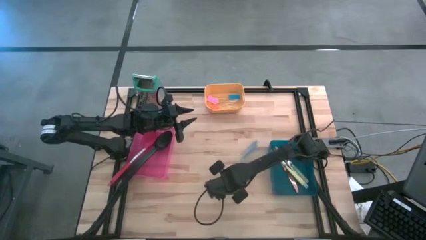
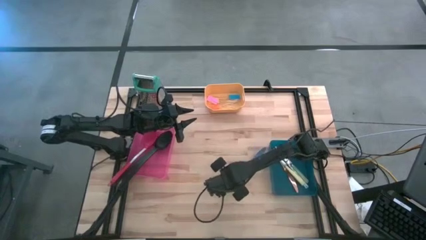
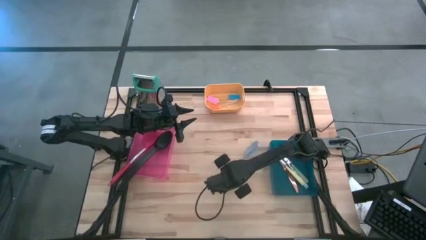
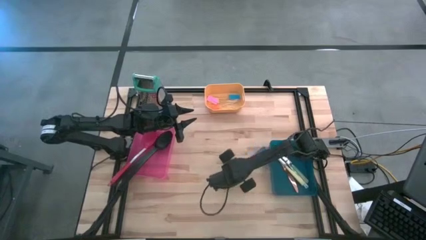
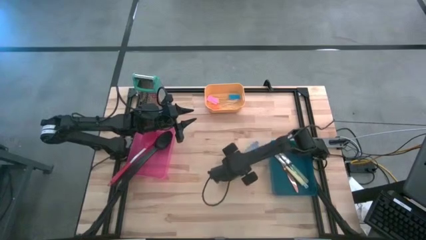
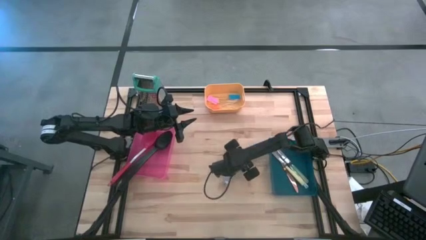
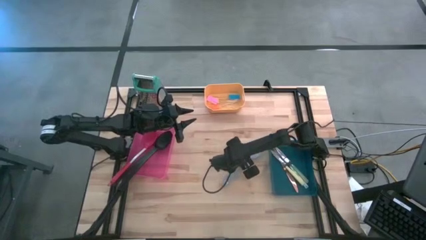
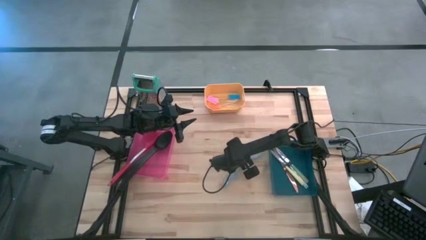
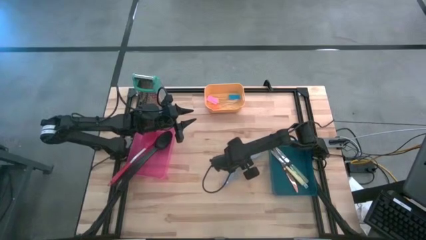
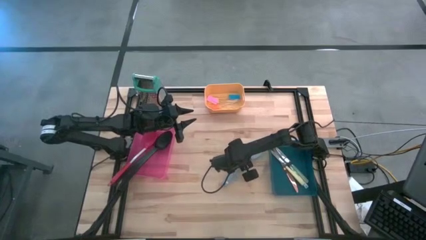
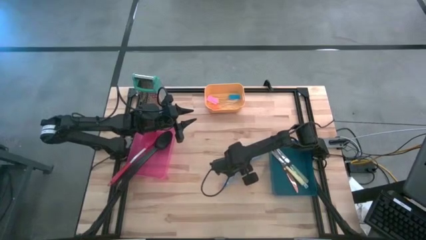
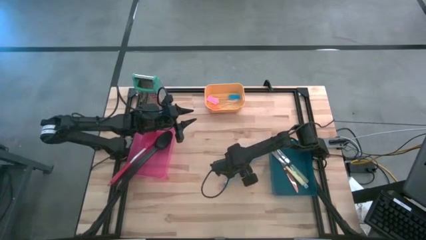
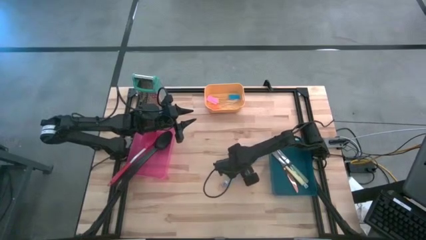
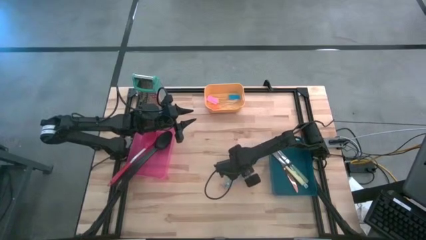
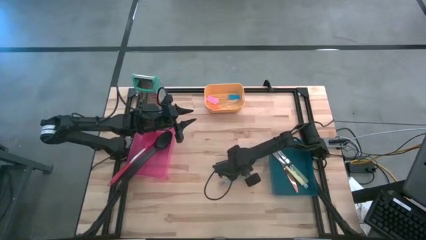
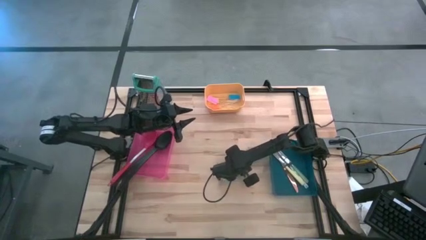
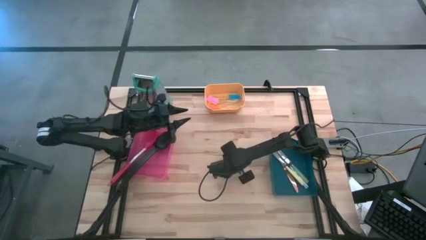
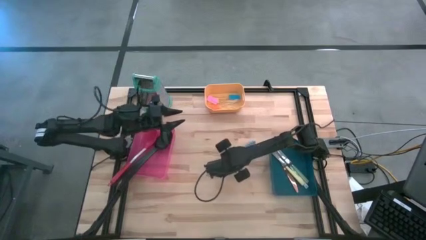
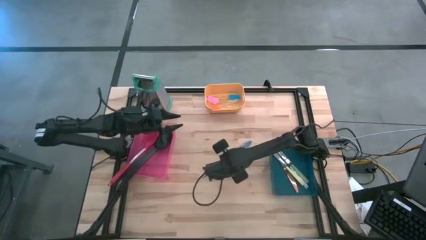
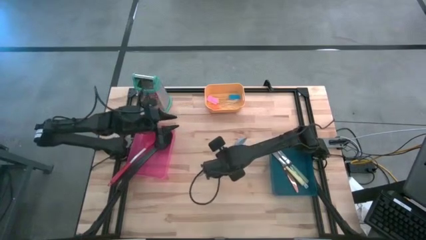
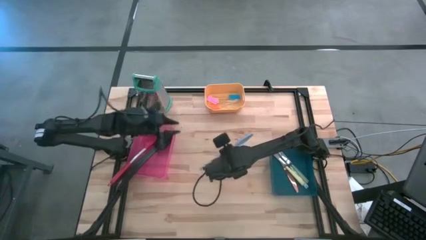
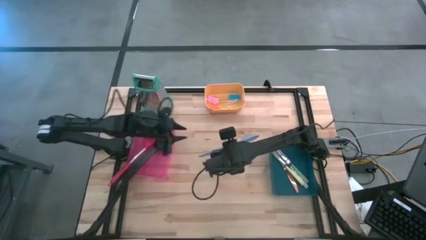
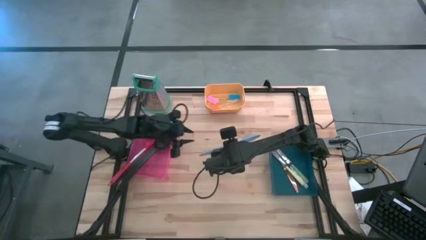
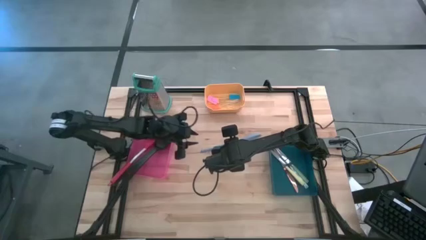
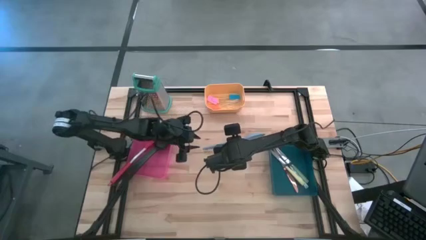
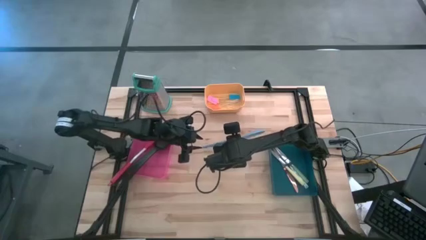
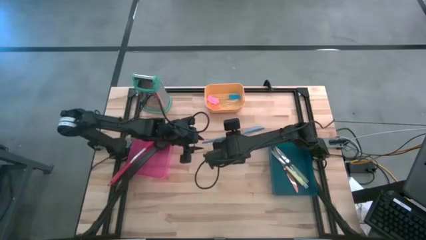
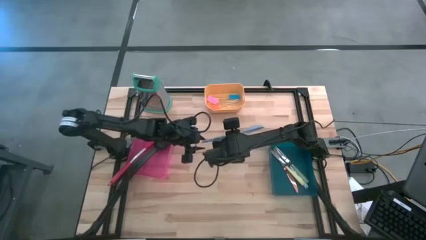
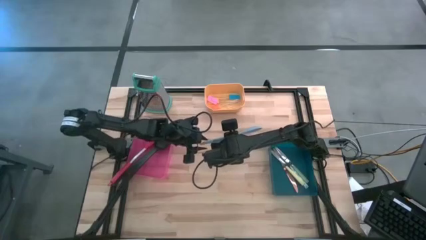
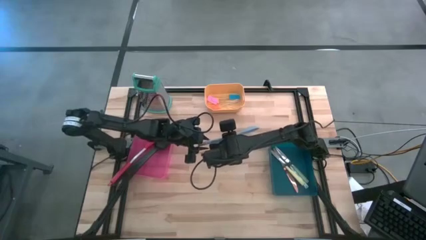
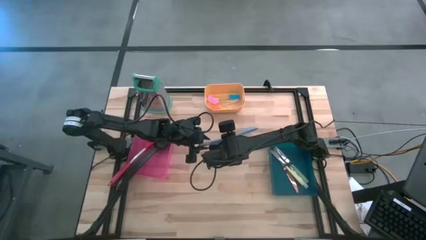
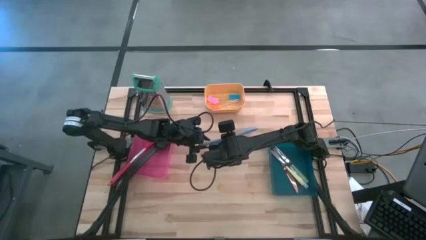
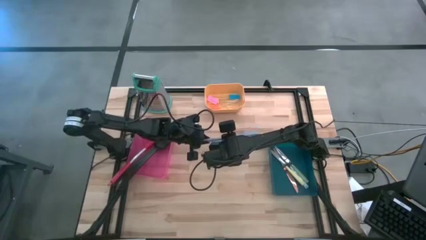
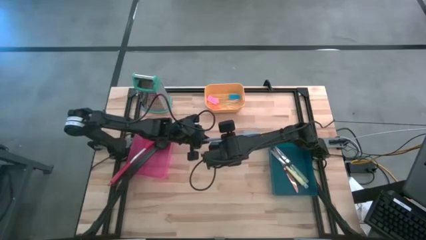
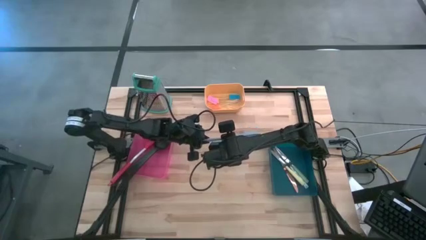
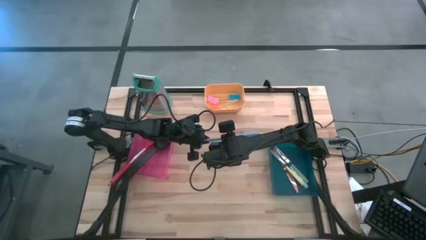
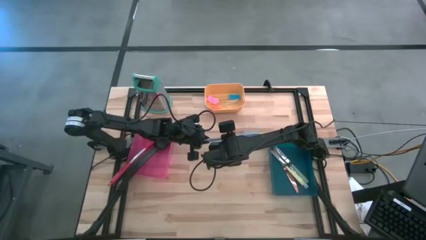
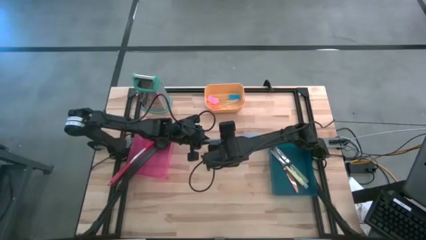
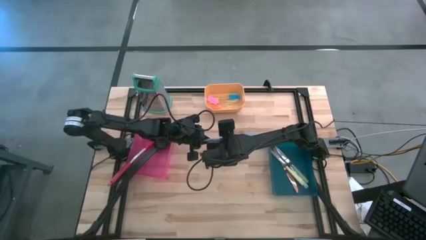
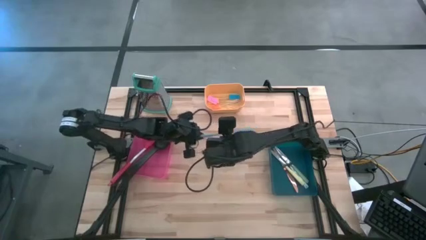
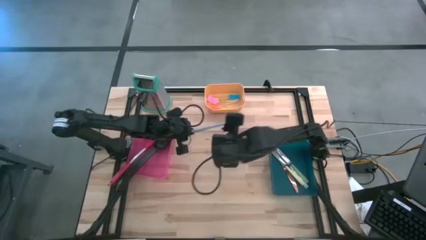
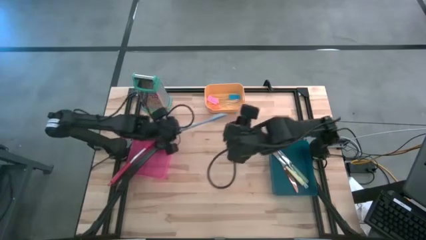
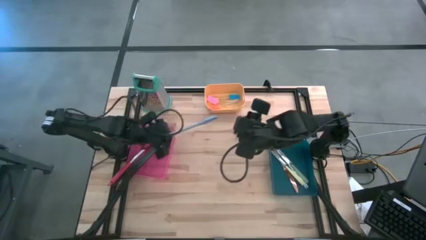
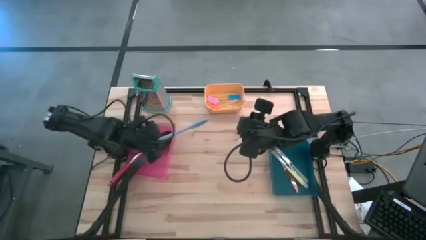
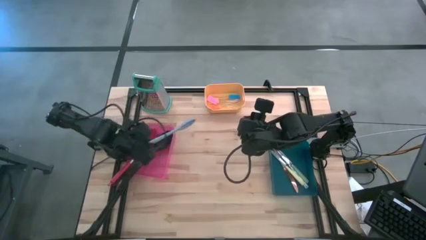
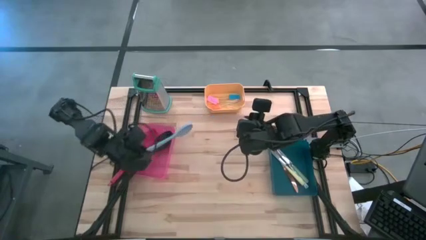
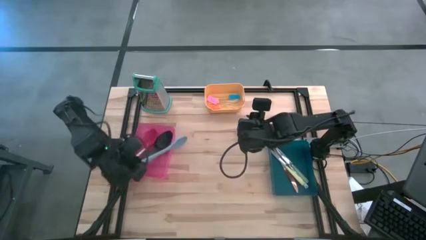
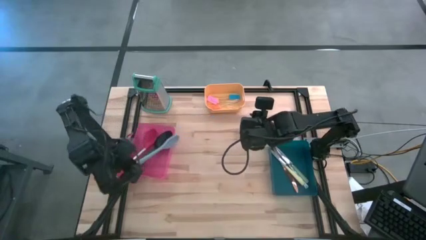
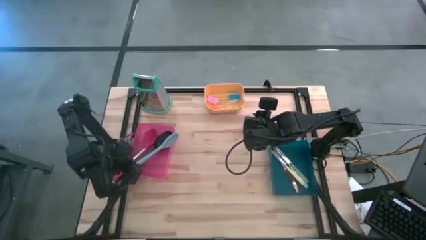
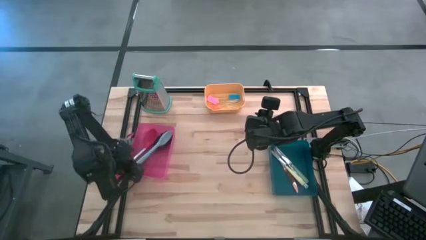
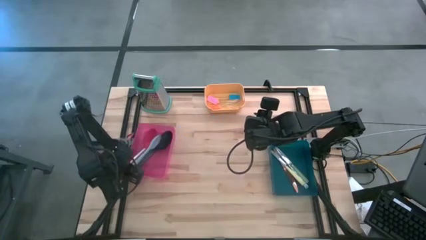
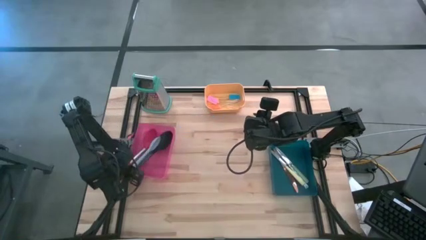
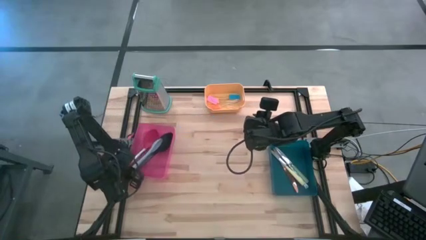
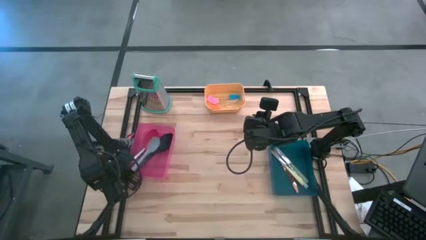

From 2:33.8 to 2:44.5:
Task: Pick & Place Kitchen Items
Put the gray serving spoon into the pink bin

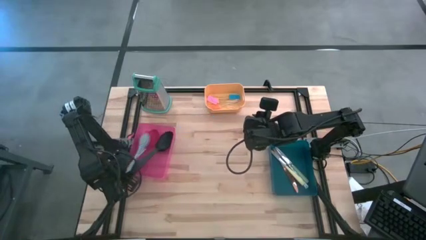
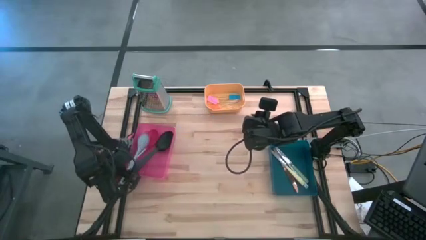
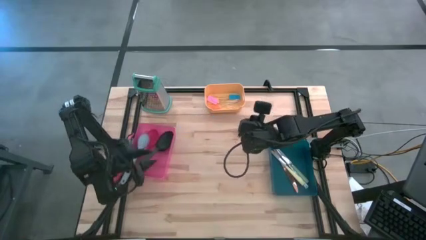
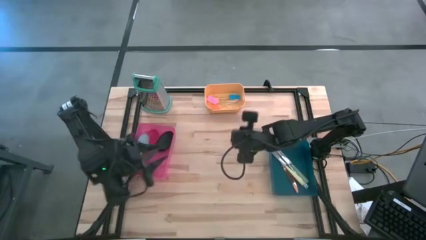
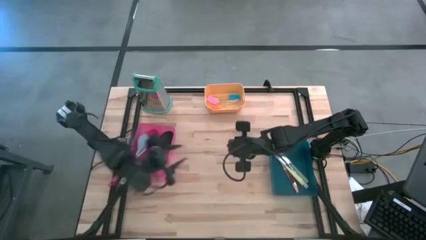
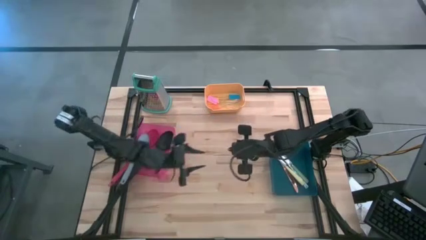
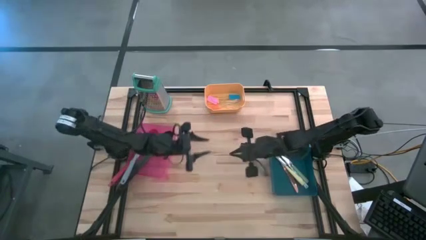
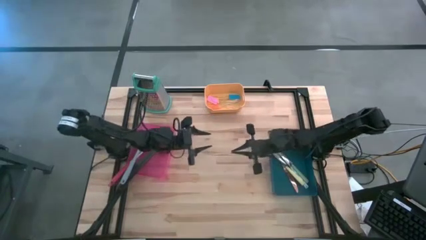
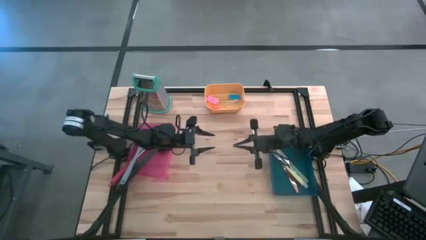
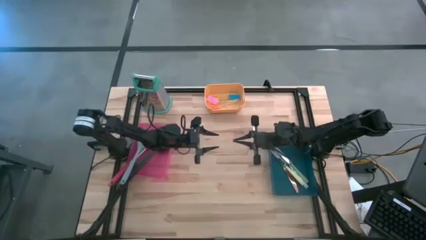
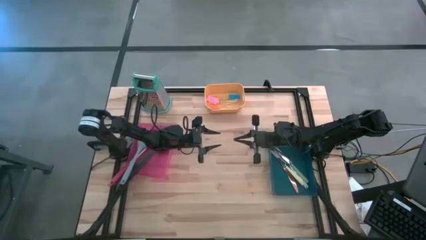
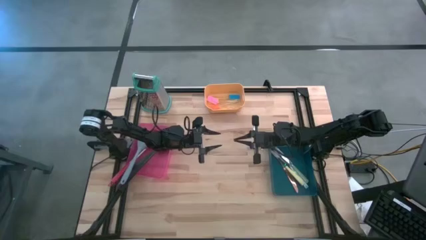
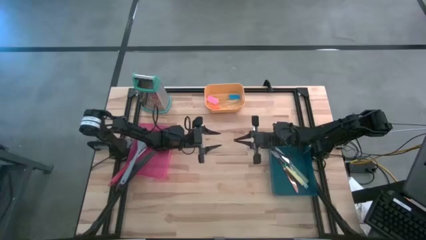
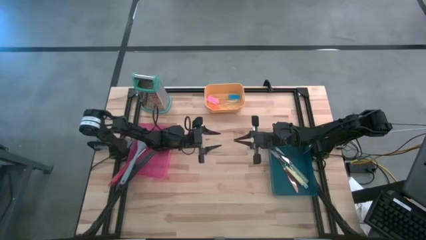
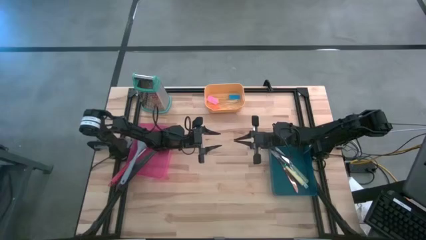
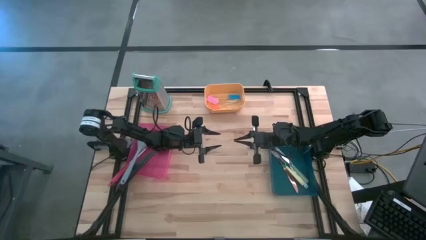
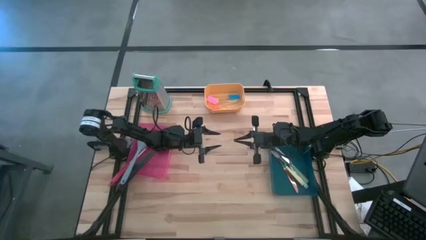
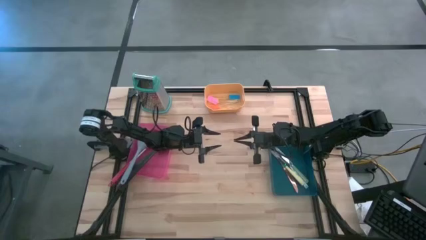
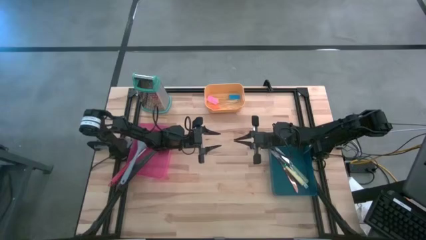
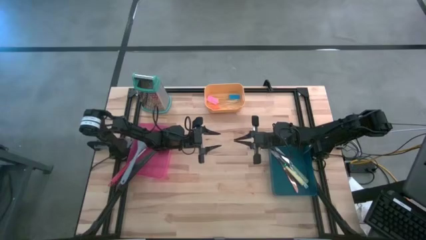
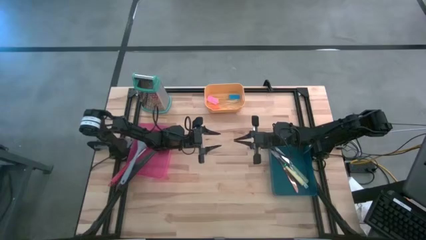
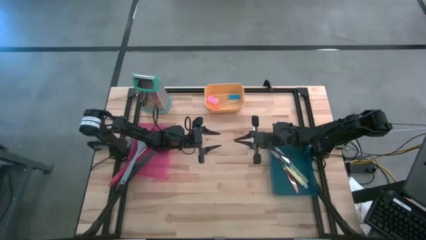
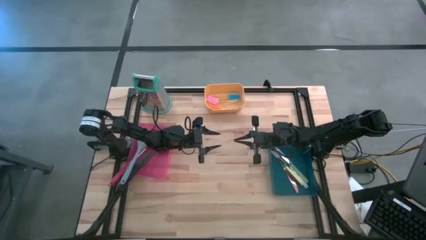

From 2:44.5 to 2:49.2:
Return to Home Position
